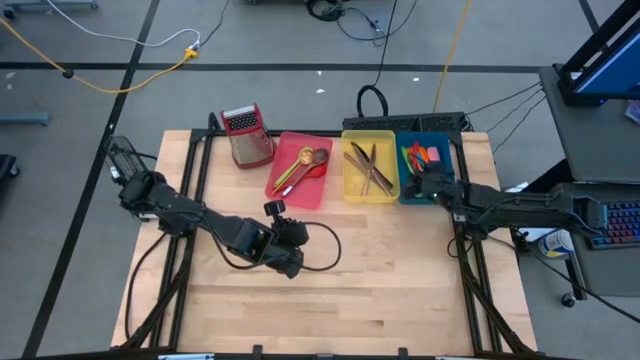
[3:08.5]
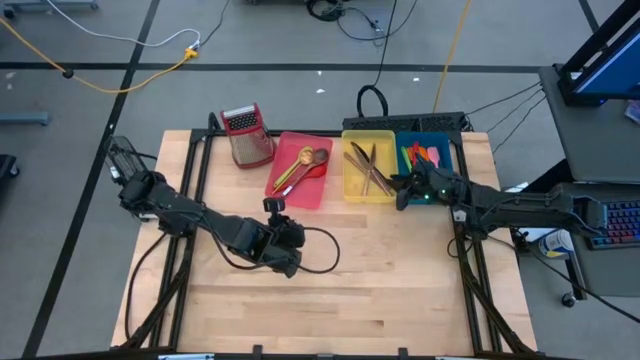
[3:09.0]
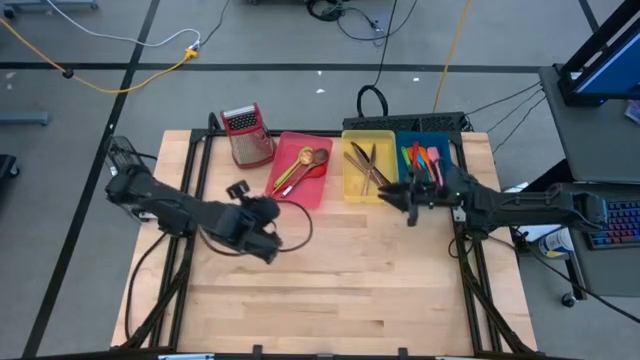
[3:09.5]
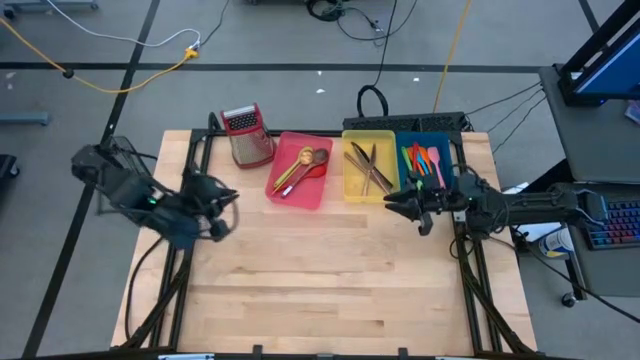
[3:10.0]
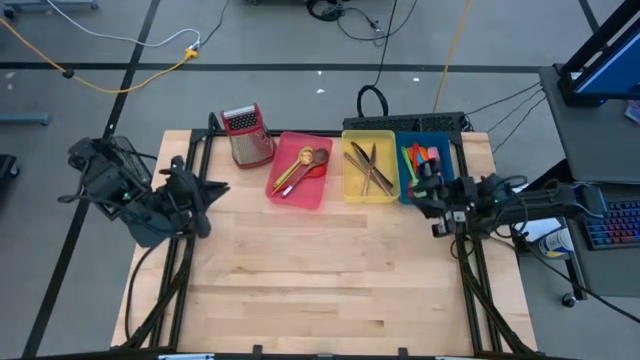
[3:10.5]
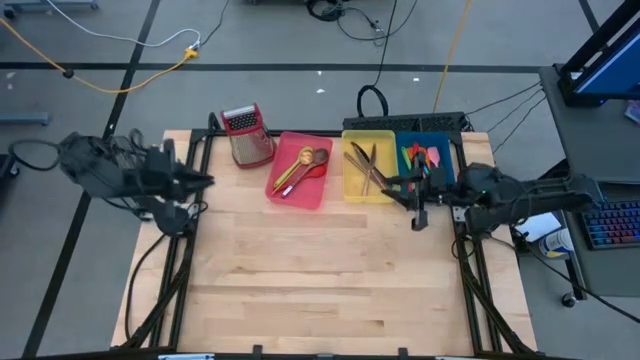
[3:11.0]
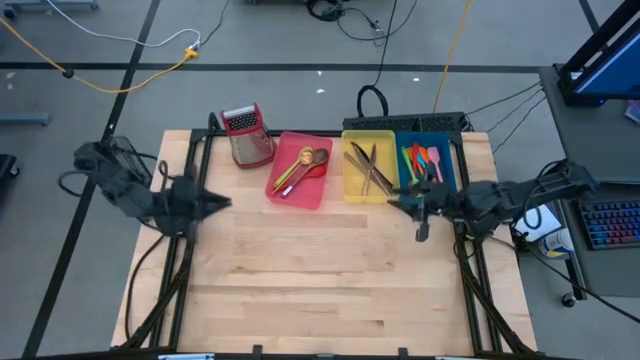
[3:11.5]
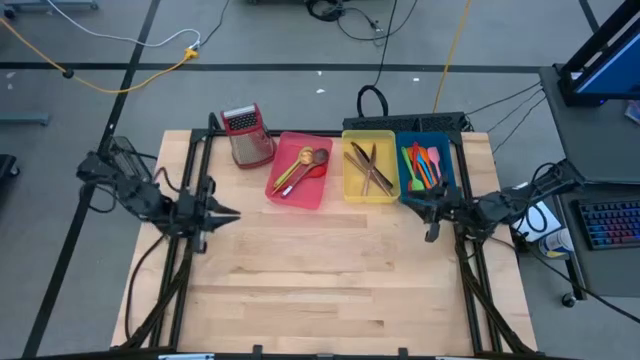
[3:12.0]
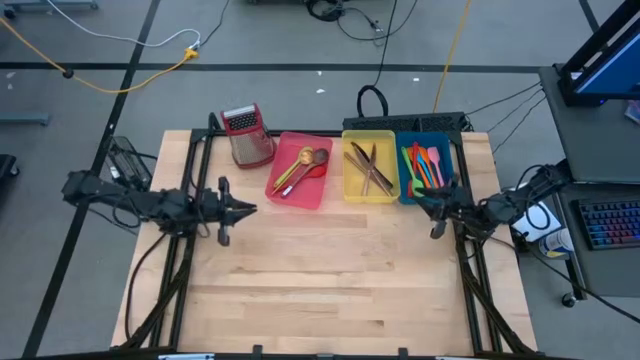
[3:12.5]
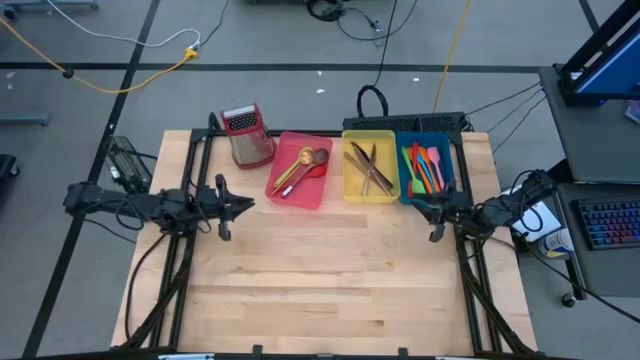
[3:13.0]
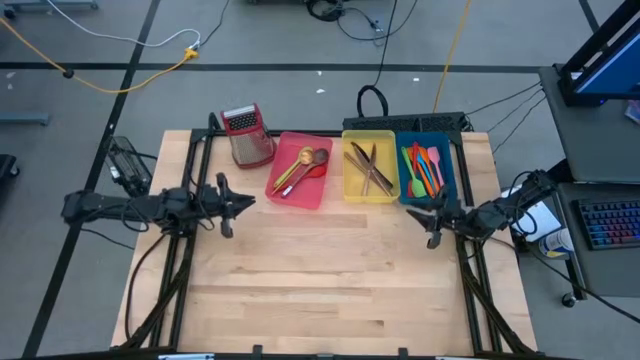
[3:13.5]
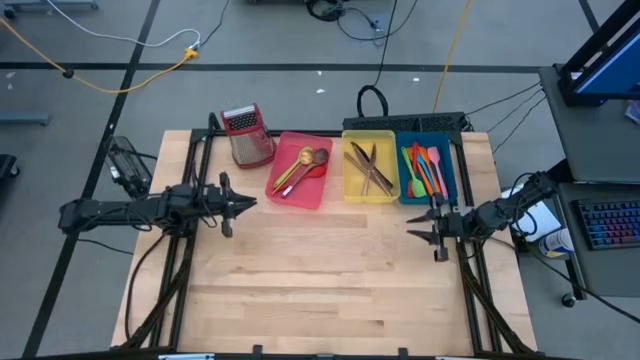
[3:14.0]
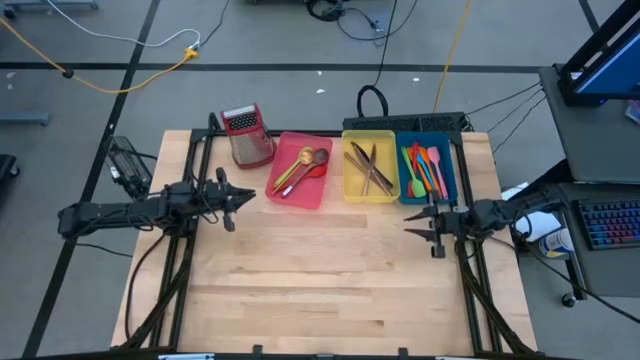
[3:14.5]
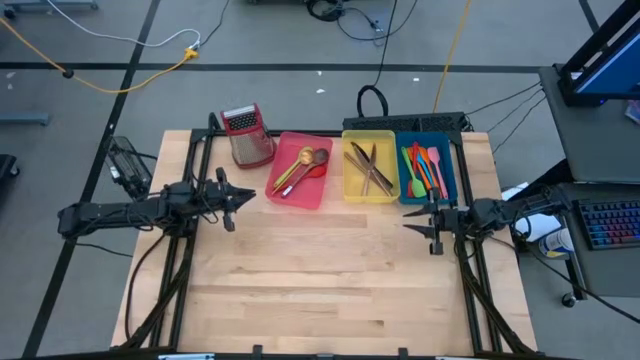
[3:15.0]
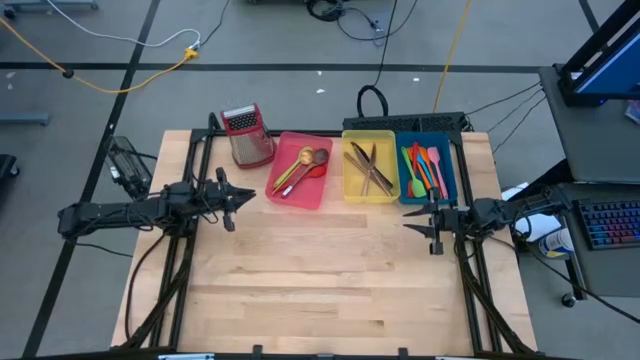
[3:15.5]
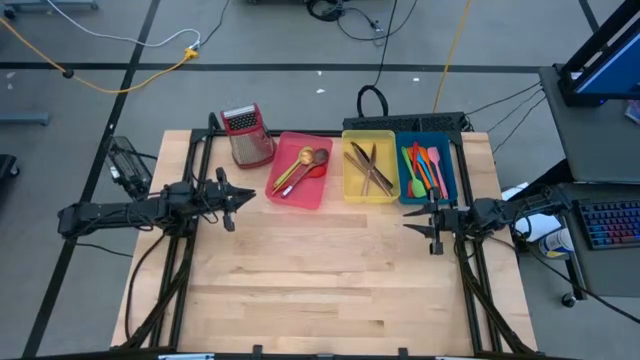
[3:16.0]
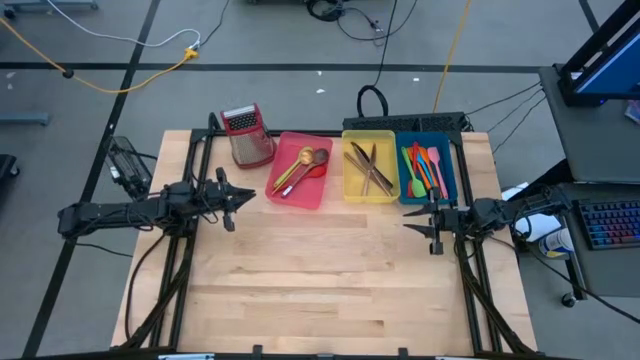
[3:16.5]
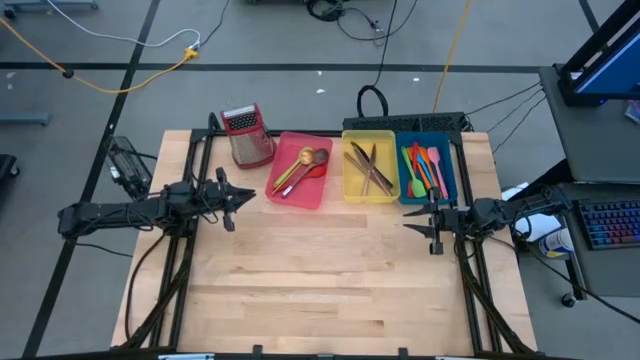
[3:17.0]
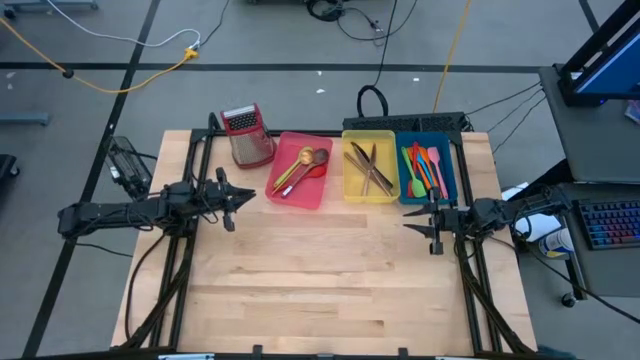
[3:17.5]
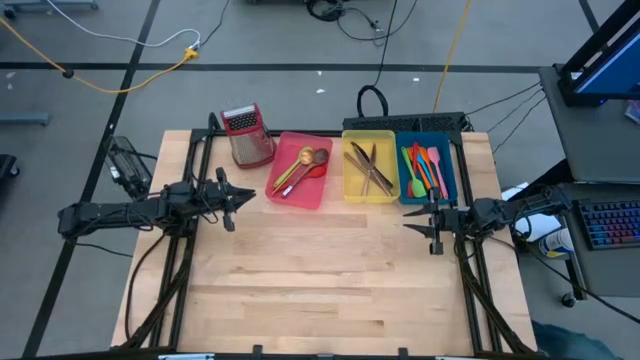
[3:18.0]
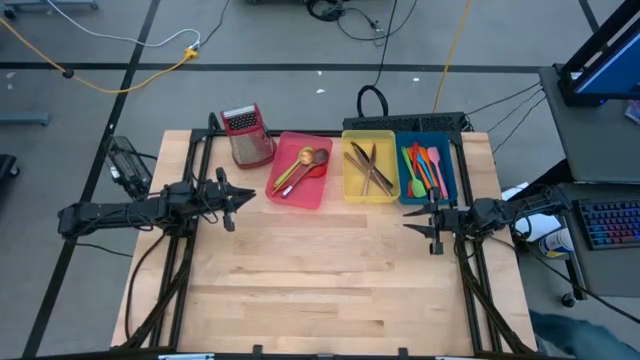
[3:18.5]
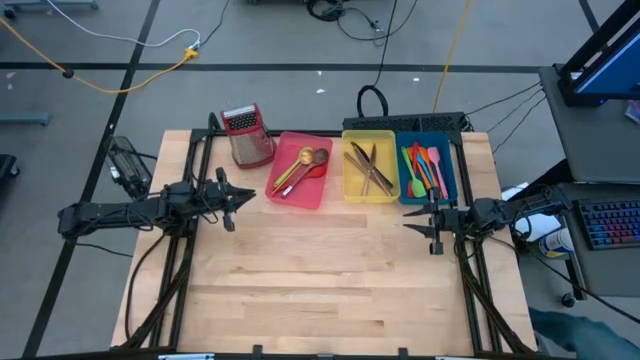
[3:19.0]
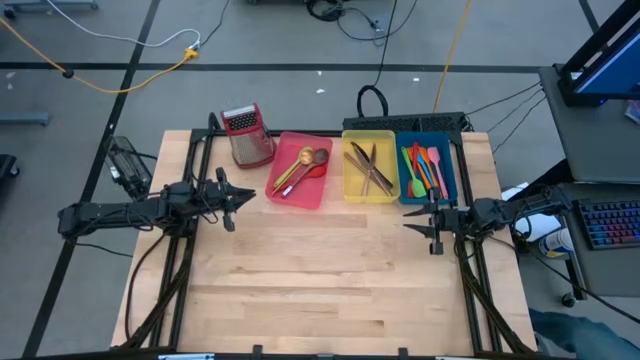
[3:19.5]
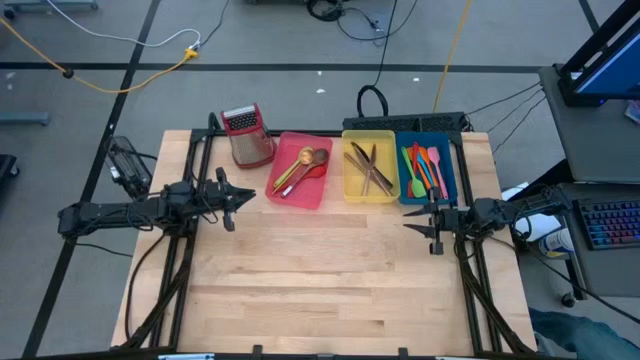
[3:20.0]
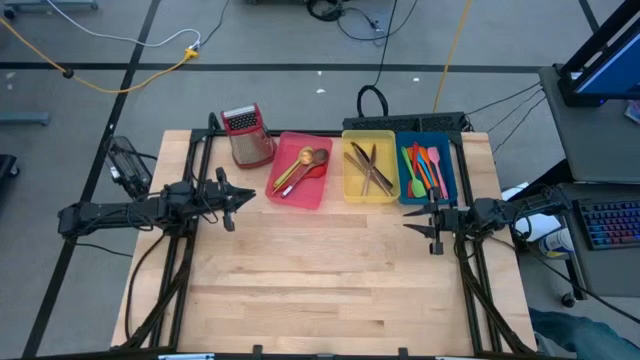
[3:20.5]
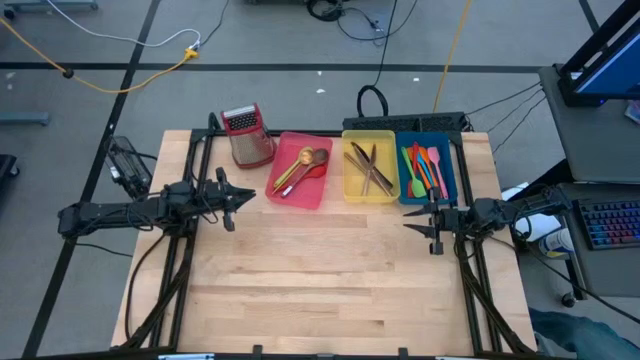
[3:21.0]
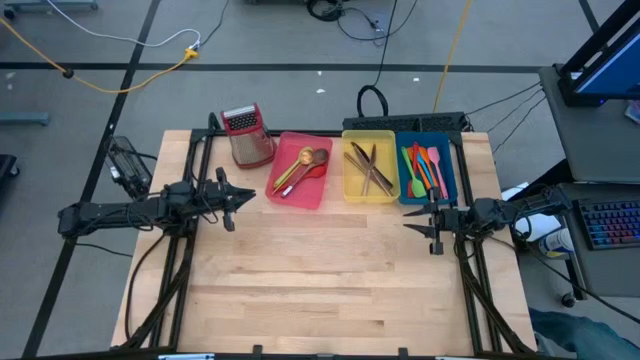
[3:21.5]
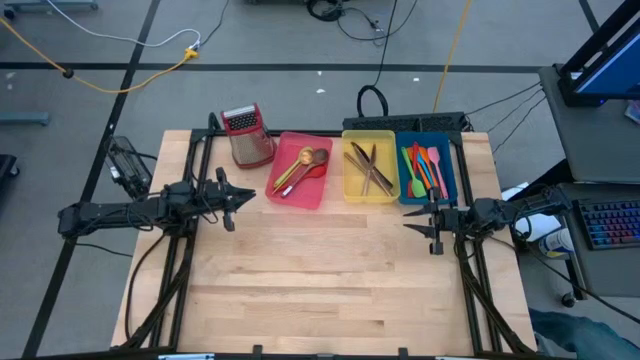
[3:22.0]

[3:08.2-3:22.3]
Task: Pick & Place Kitchen Items
Return to Home Position

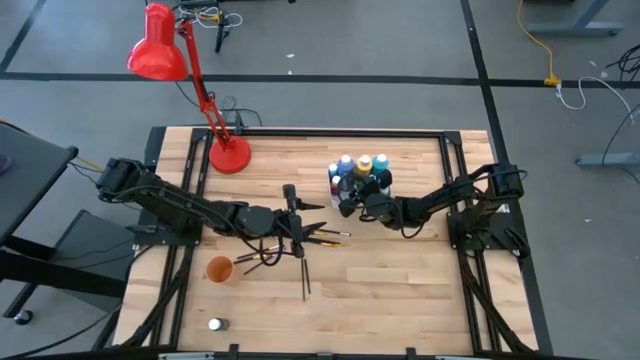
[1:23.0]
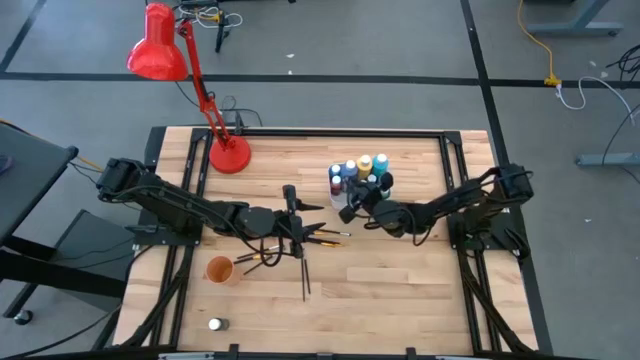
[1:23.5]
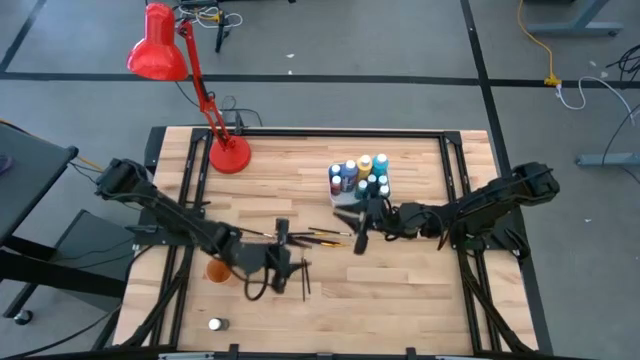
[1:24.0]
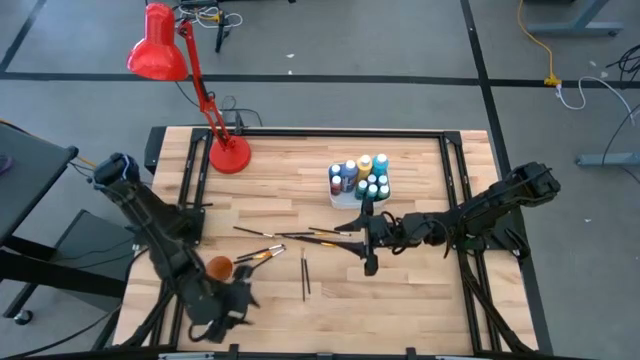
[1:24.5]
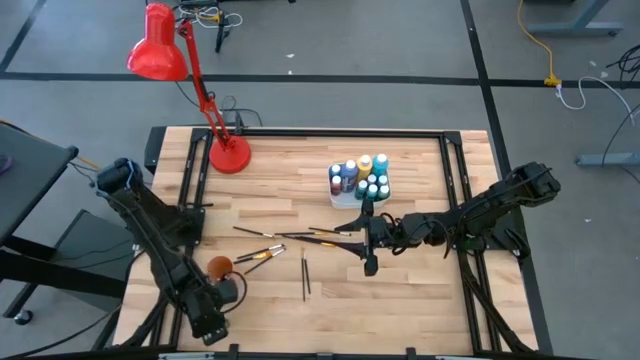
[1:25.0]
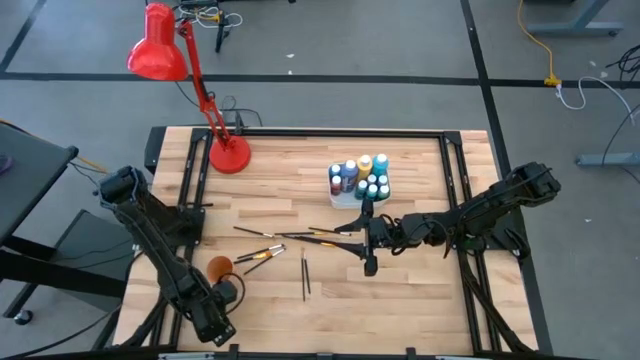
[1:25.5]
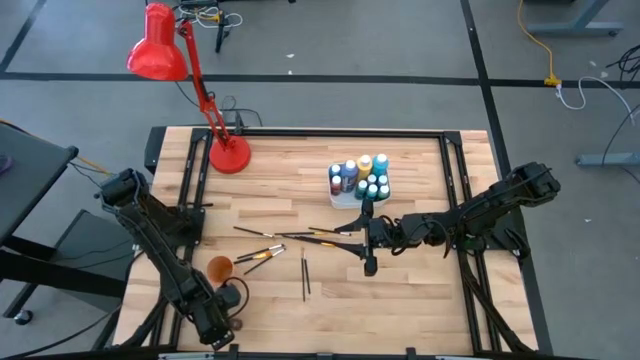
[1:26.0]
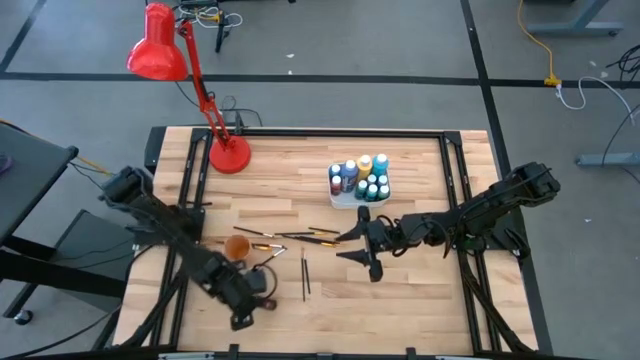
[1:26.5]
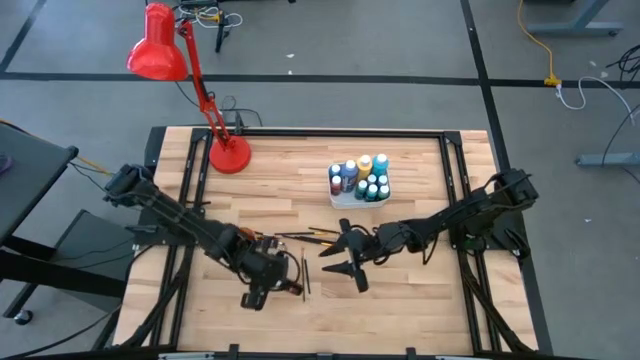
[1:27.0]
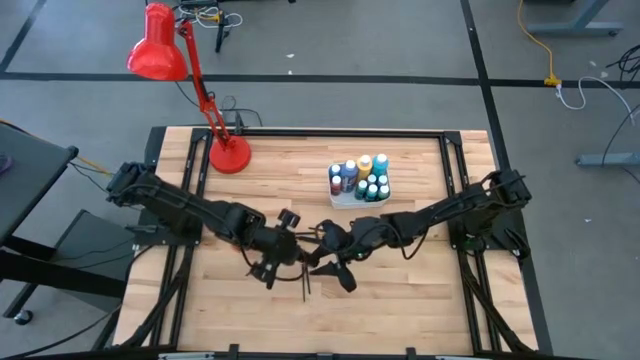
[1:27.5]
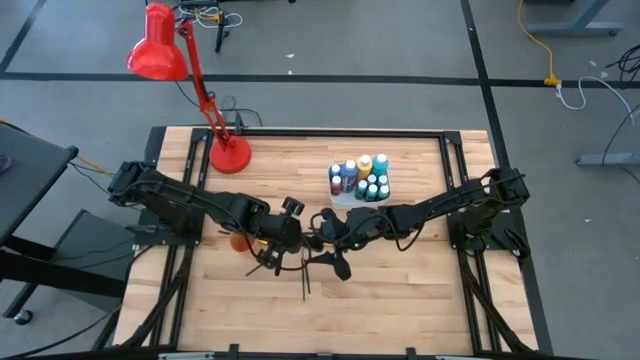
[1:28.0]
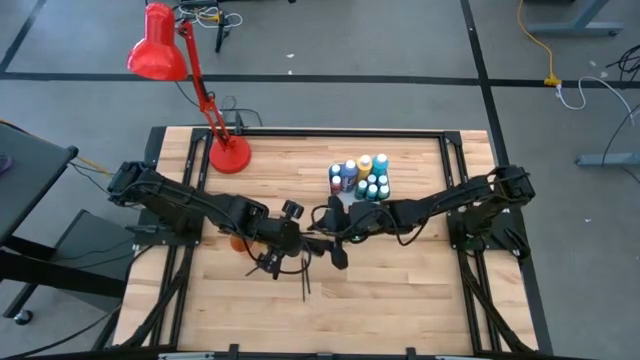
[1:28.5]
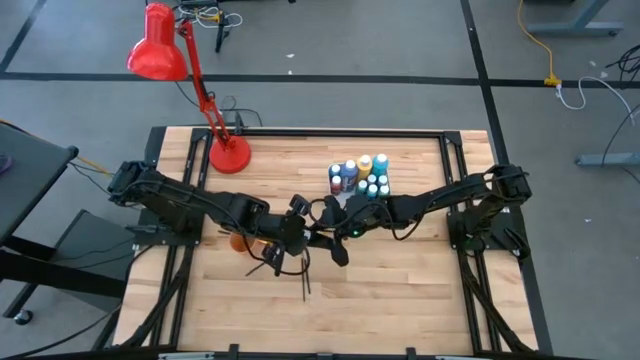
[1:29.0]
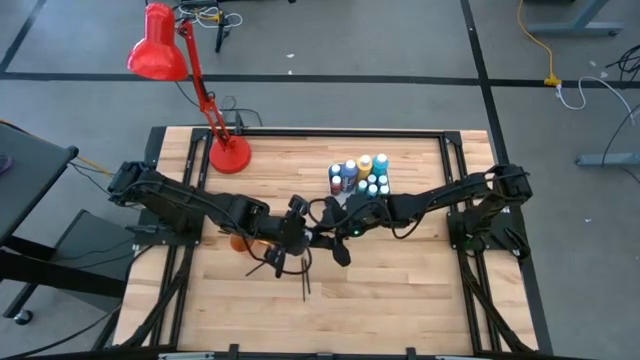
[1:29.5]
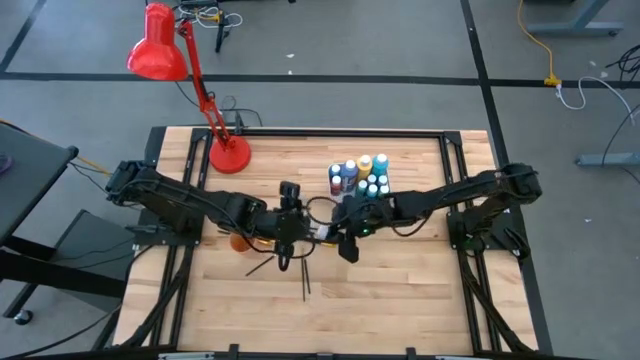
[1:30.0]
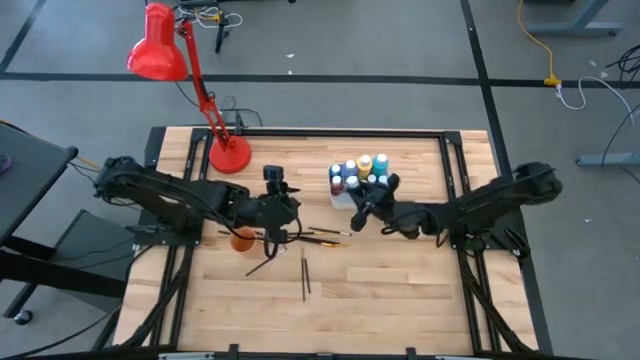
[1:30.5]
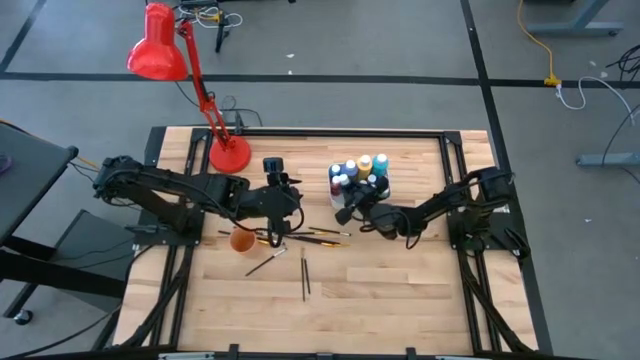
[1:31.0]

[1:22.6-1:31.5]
Task: Pick & Place Paint Supplies
Put the small black paint bottle into the white bin

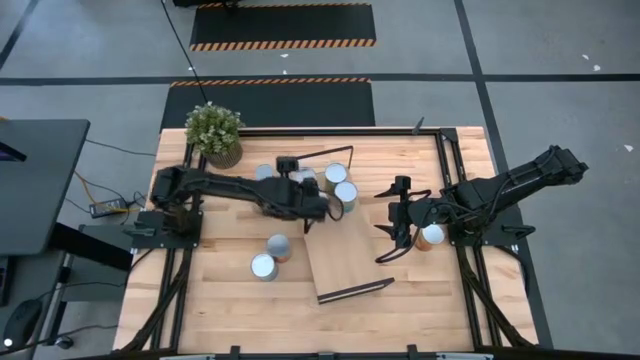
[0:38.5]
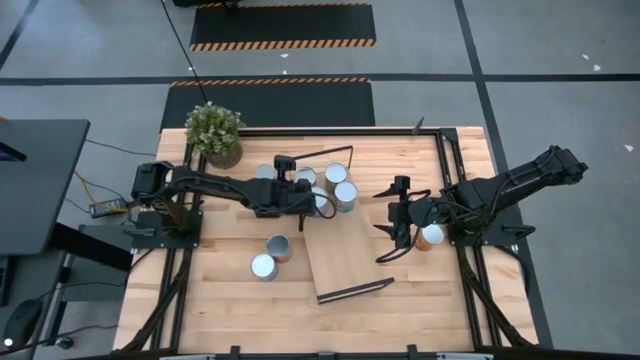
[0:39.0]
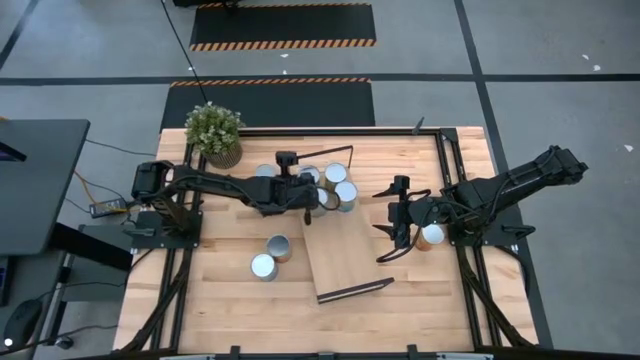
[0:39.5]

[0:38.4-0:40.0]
Task: Pick and place cans onto a shelf
Adjust the left canned oranges on the shelf
